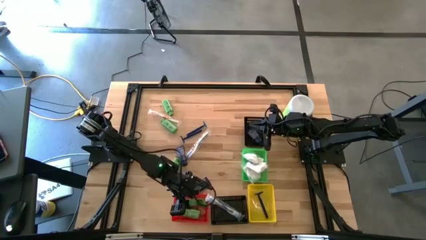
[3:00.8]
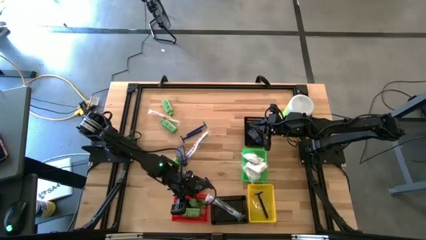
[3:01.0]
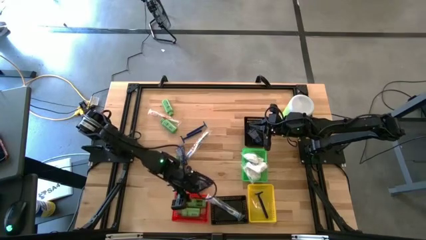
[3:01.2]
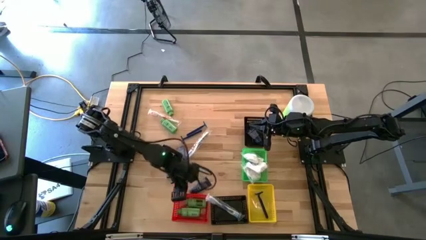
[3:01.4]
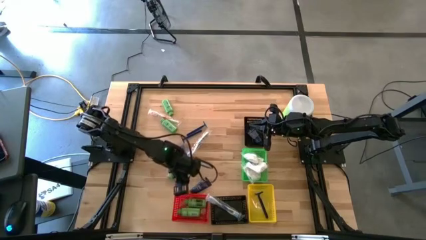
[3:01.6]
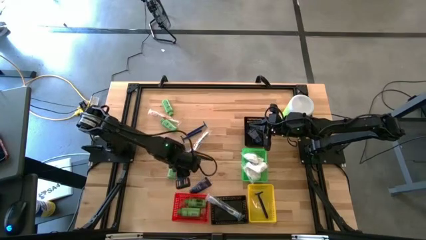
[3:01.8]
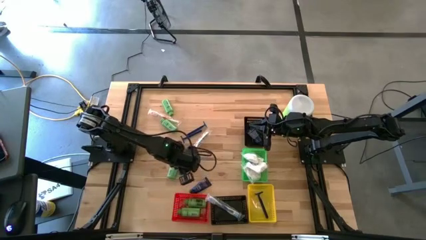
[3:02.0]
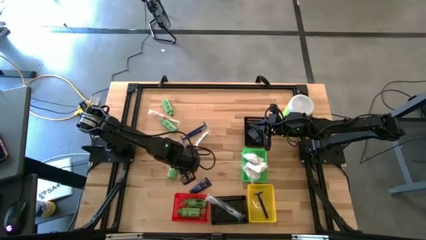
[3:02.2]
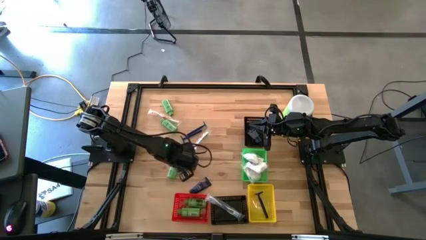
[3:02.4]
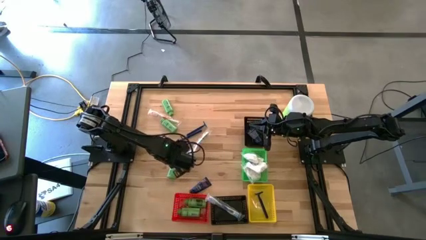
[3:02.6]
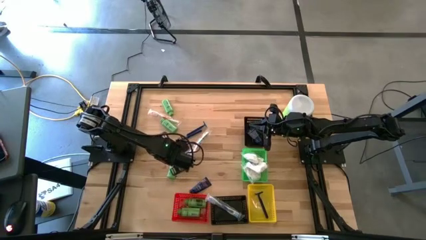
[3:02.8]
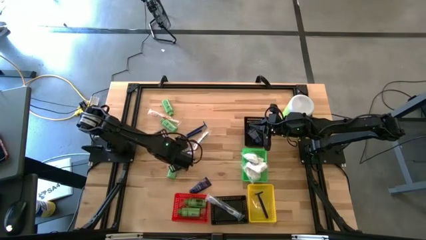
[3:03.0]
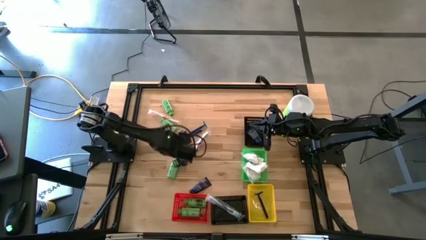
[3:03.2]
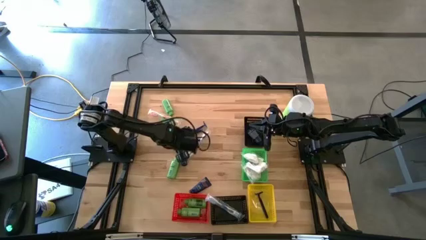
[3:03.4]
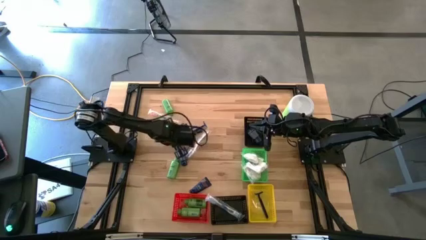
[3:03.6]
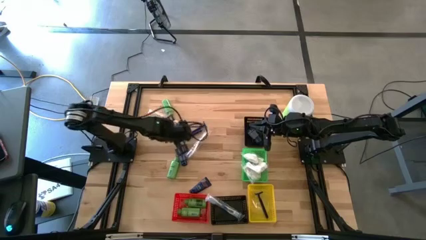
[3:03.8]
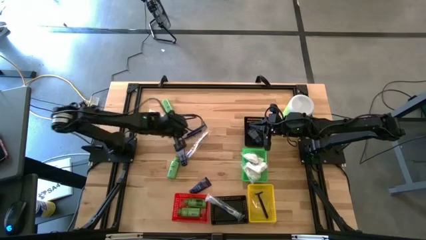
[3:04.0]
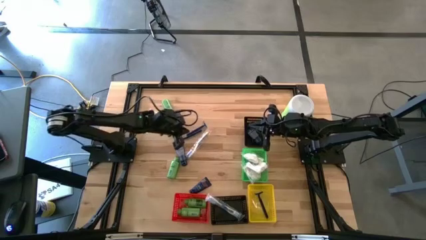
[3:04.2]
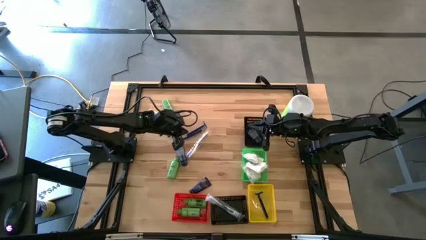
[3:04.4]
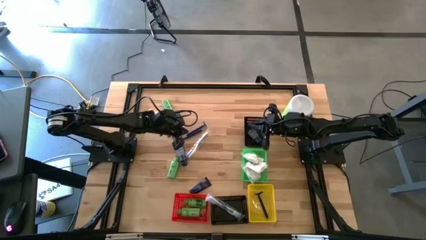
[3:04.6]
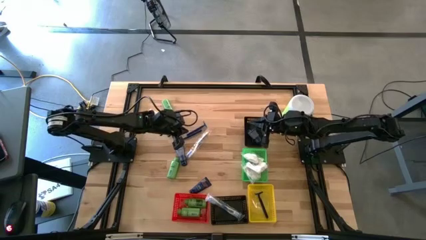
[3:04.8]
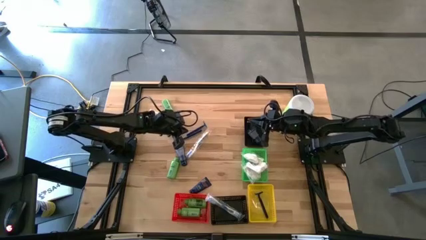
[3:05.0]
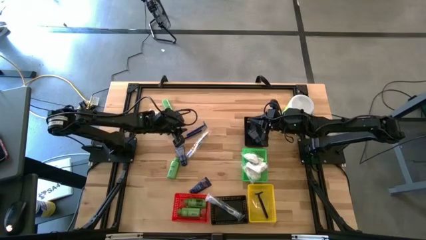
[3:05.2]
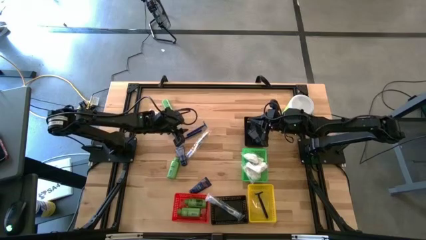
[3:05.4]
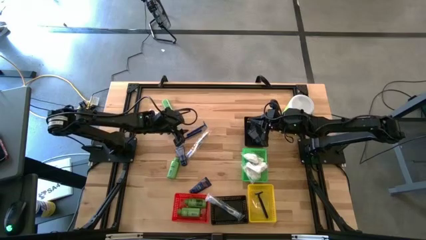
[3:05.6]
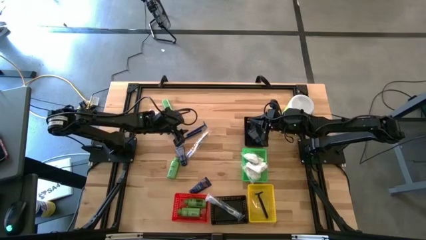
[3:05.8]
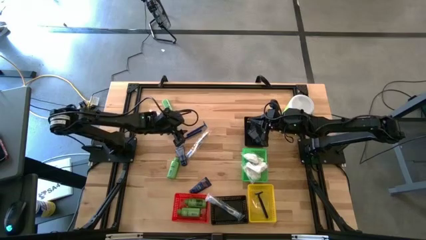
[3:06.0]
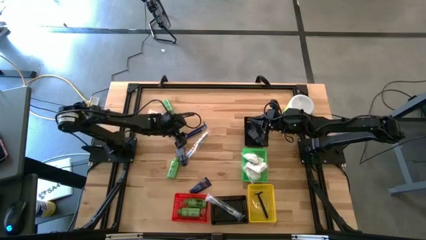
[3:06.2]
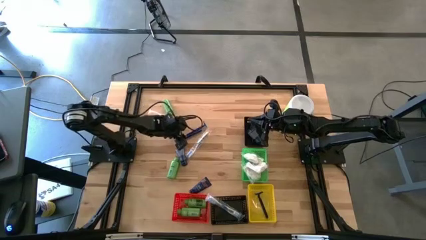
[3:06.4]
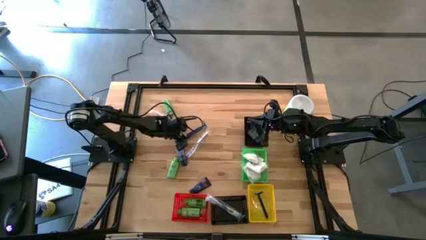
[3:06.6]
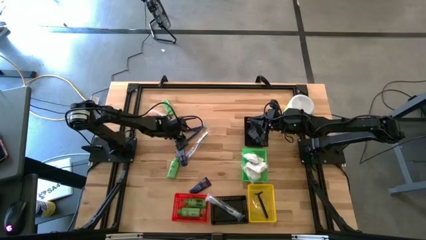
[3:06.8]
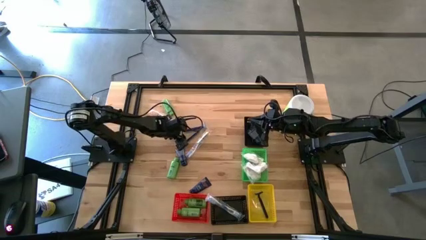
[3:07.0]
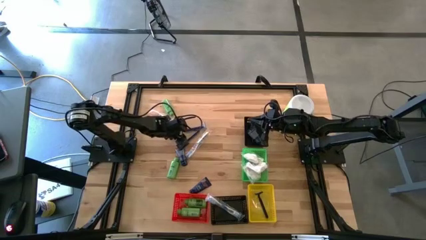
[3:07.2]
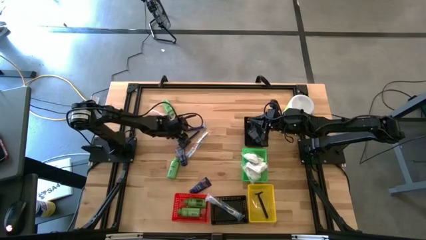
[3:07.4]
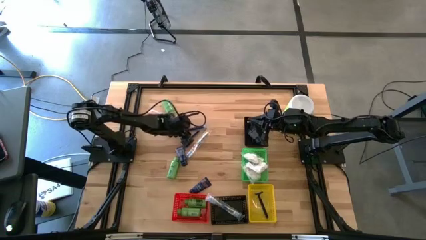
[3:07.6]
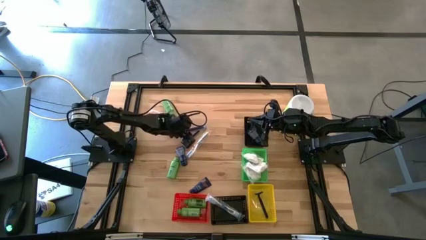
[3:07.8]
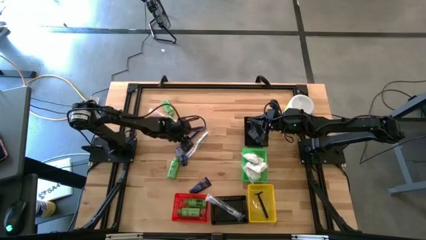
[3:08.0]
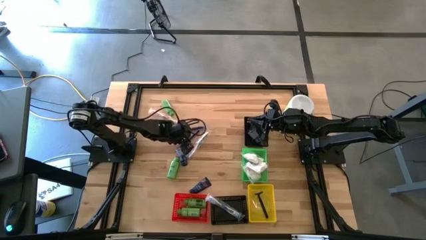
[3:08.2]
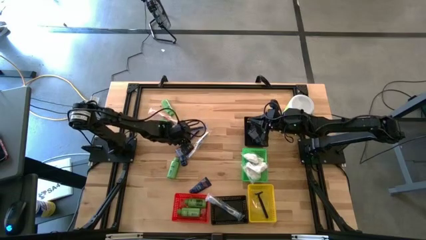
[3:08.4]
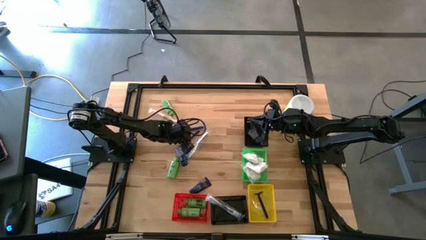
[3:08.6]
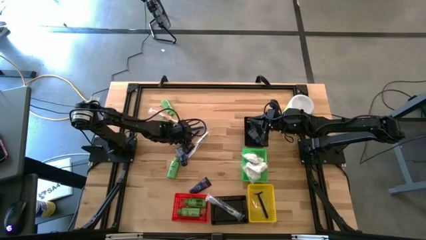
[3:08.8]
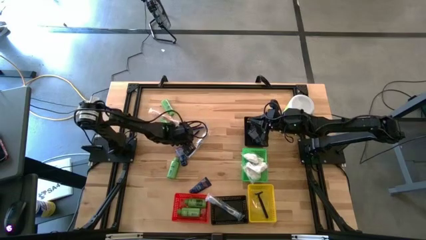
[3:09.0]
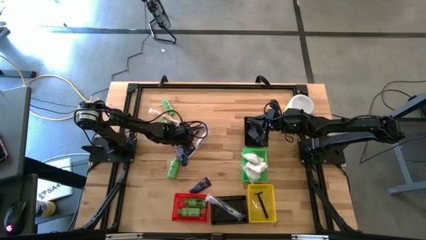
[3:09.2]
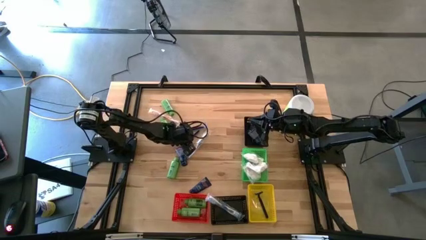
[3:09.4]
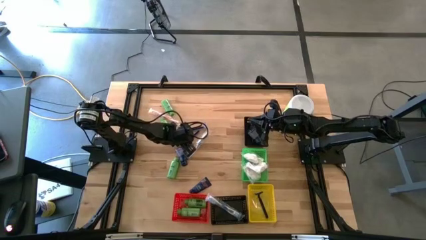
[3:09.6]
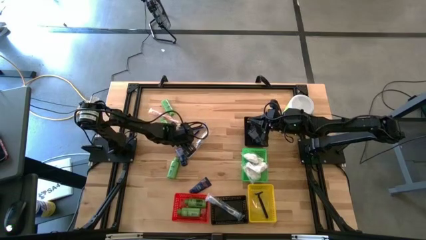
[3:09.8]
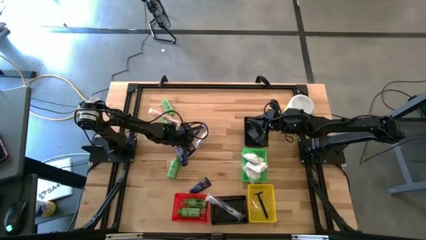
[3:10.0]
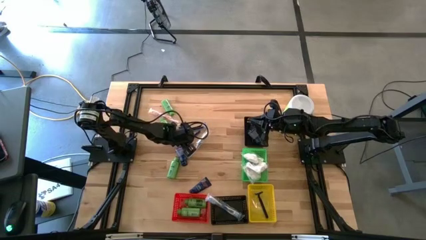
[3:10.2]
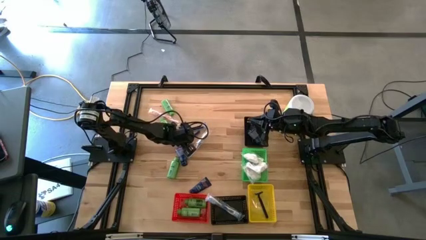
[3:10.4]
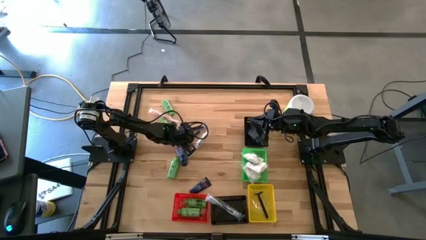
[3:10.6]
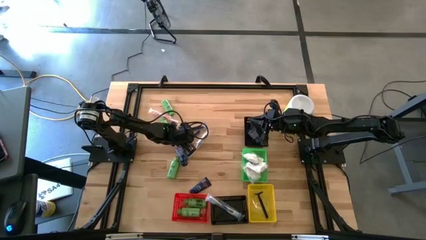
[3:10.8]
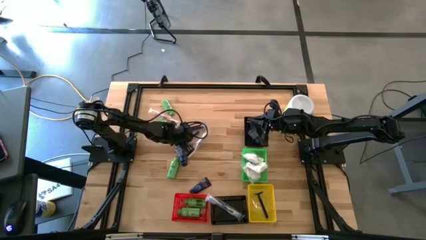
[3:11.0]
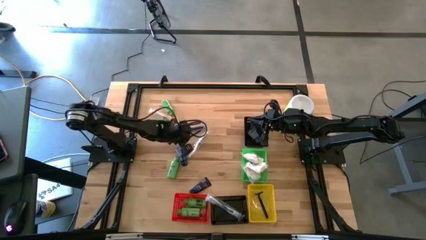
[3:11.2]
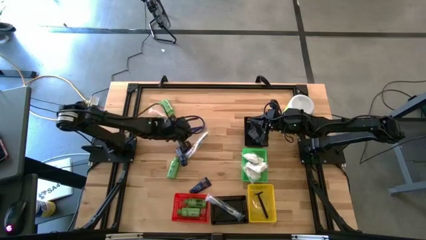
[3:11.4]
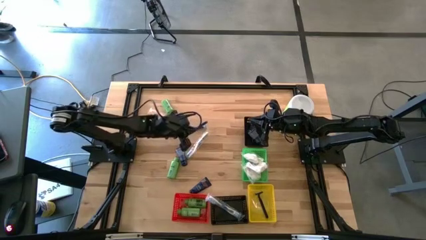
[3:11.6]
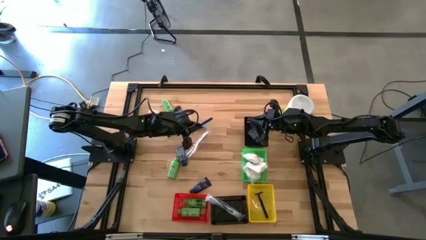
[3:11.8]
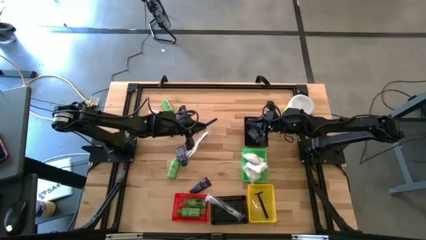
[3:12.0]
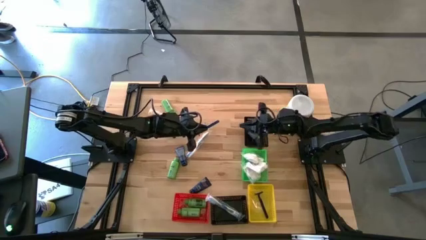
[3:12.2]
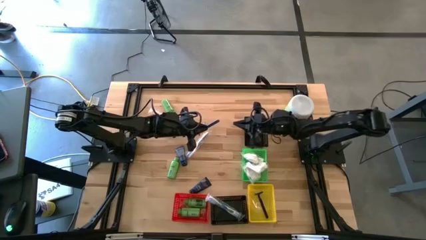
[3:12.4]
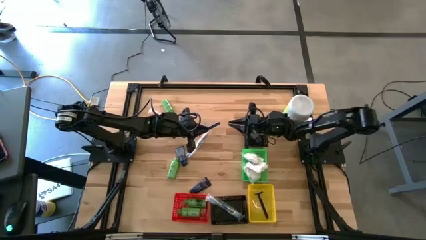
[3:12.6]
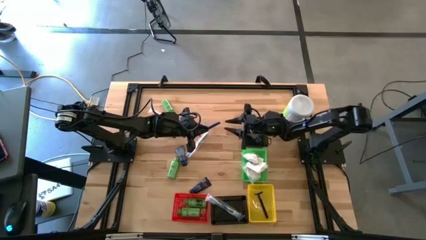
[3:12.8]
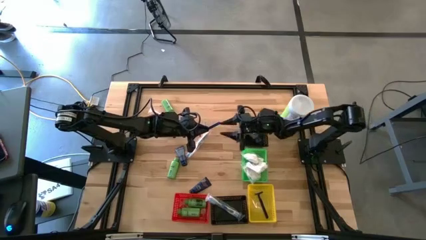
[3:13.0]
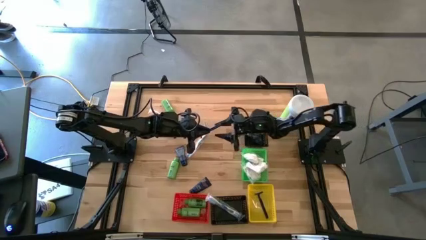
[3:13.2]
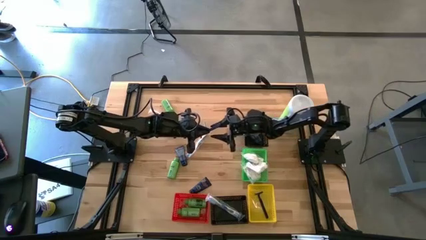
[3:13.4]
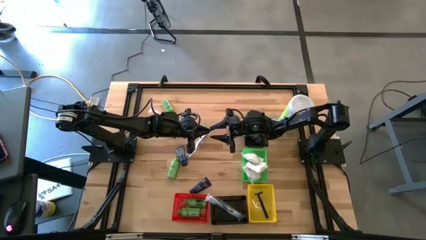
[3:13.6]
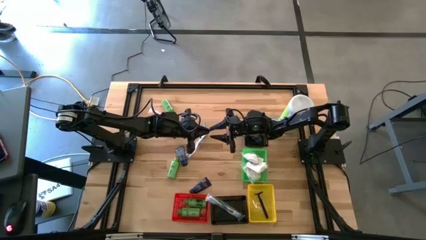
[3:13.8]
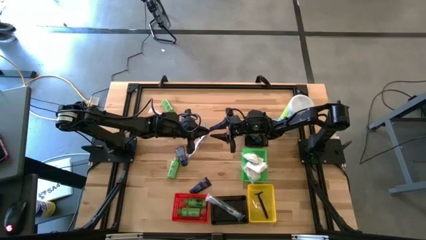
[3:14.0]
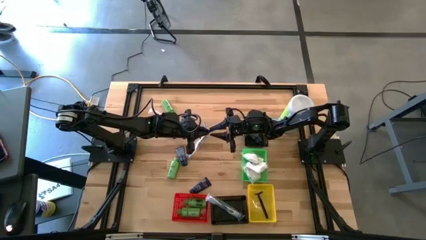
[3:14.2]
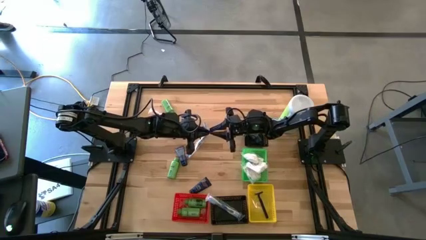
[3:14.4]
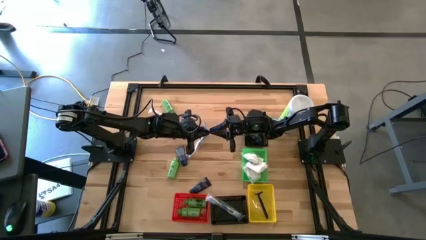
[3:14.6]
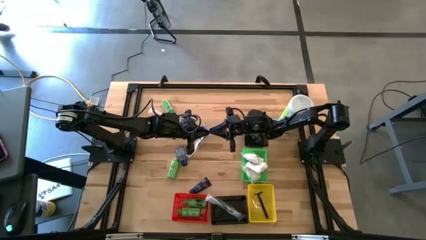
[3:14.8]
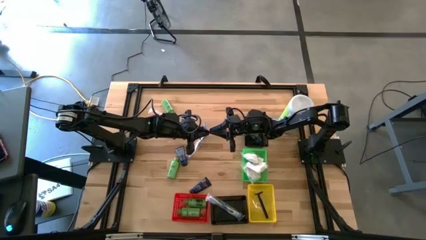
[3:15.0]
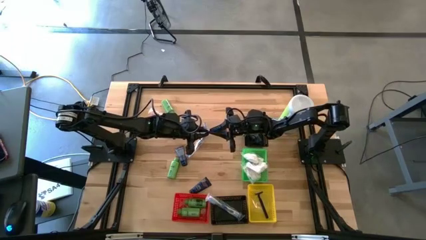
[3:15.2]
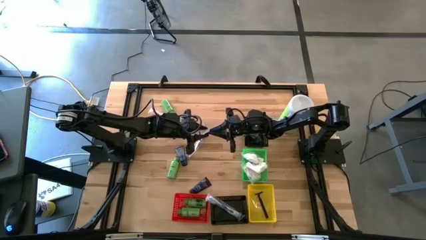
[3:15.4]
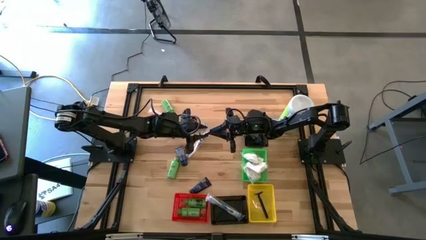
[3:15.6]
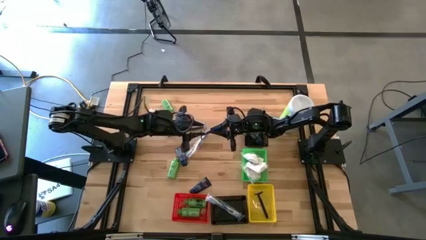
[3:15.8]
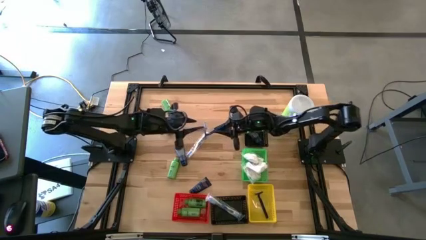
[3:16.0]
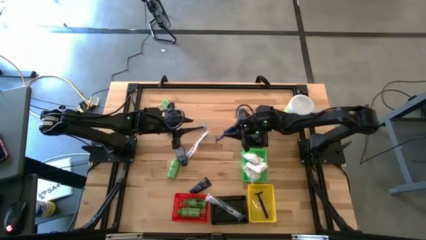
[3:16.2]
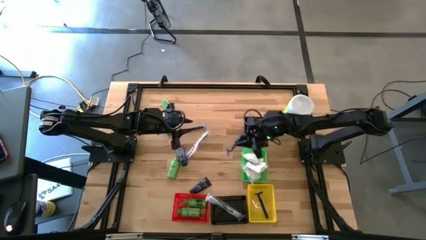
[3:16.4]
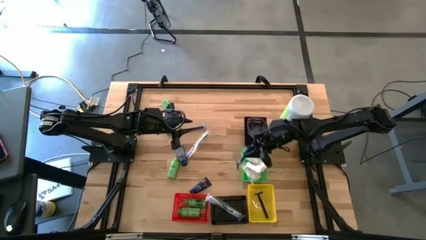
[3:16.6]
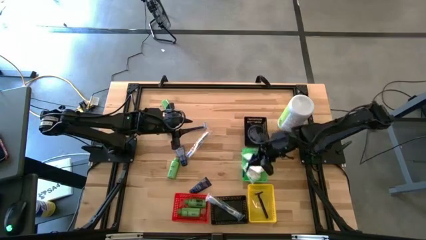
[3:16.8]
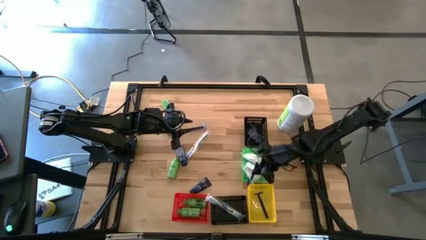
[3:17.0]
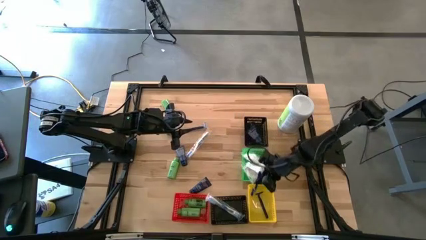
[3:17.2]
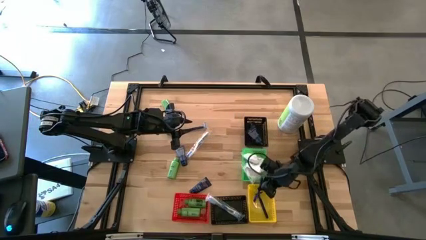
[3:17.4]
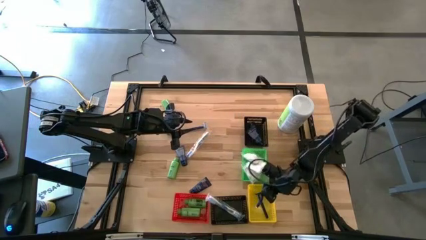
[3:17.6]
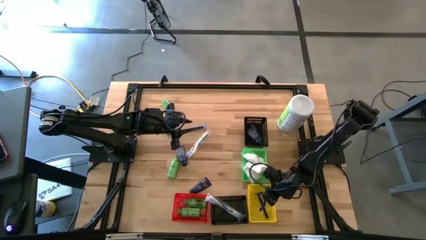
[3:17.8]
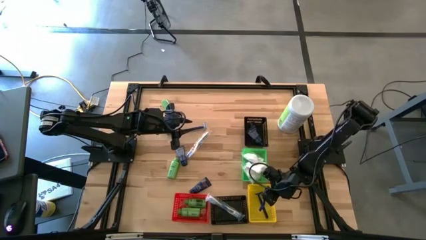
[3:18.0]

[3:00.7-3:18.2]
Task: Pick & Place Travel size toiletries
Put the bottom blue razor into the yellow bin
